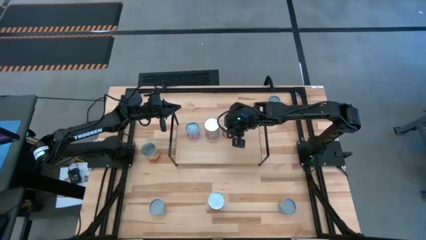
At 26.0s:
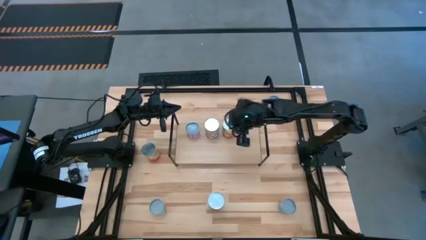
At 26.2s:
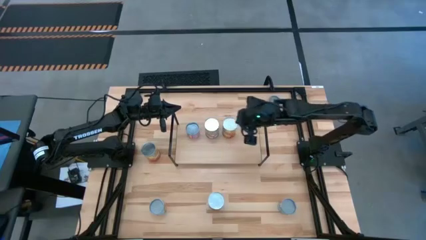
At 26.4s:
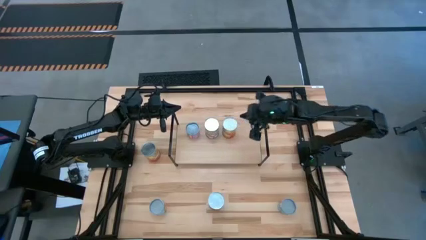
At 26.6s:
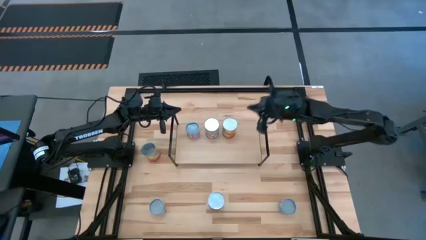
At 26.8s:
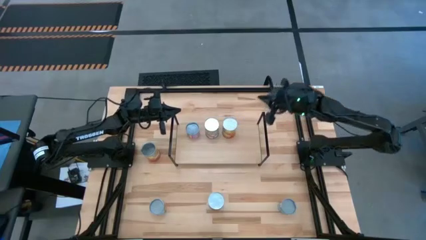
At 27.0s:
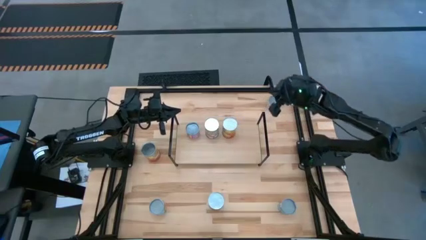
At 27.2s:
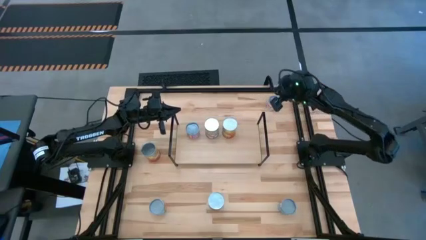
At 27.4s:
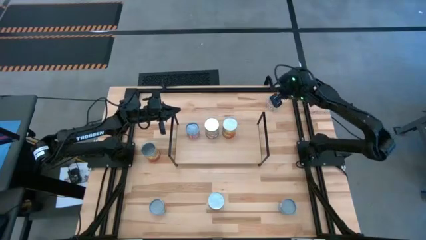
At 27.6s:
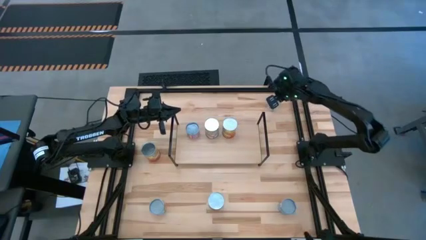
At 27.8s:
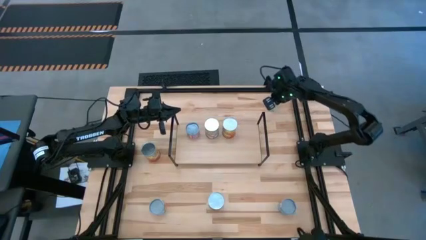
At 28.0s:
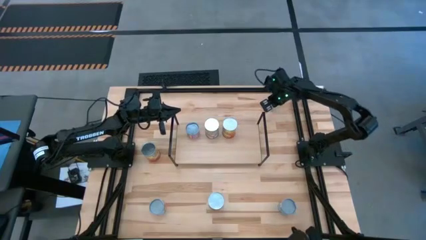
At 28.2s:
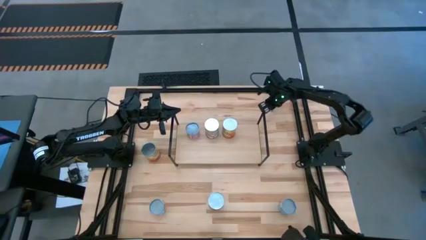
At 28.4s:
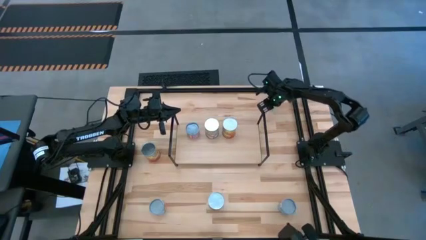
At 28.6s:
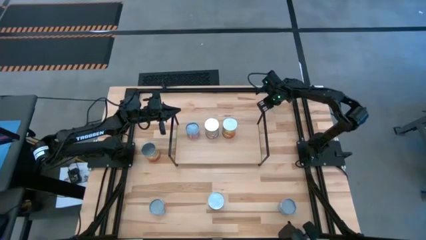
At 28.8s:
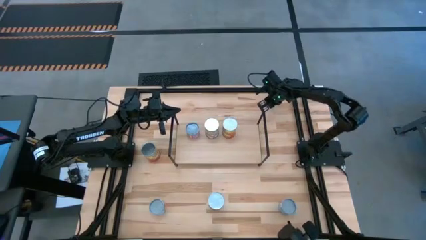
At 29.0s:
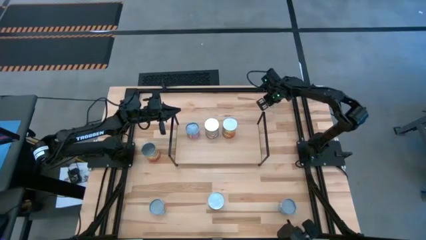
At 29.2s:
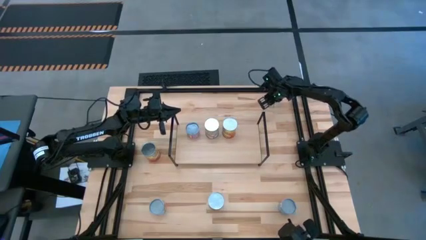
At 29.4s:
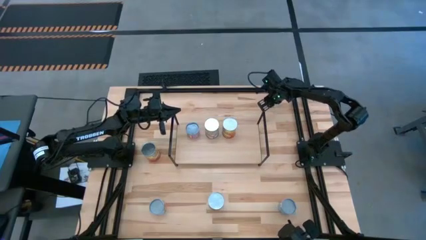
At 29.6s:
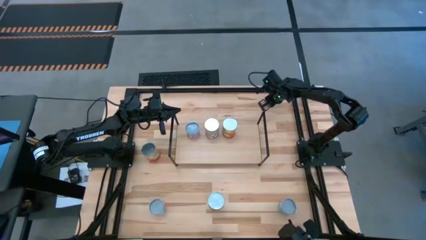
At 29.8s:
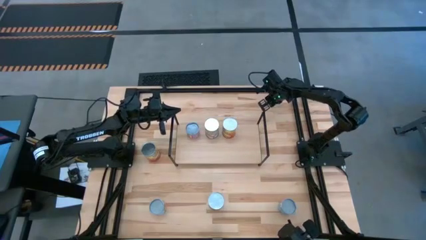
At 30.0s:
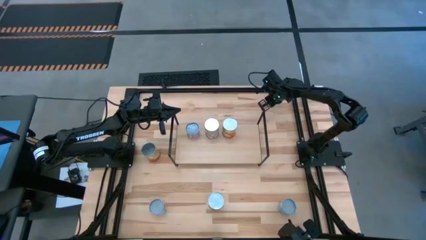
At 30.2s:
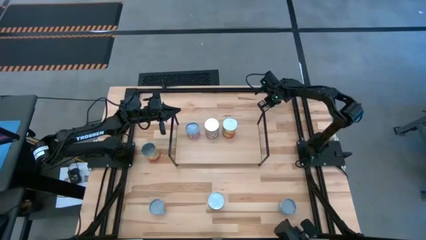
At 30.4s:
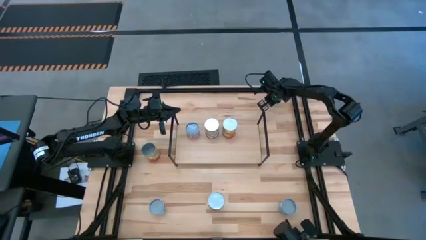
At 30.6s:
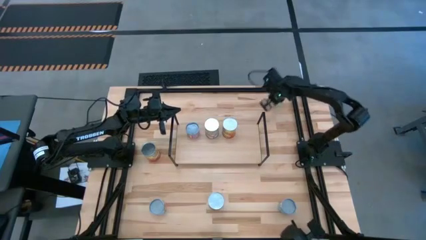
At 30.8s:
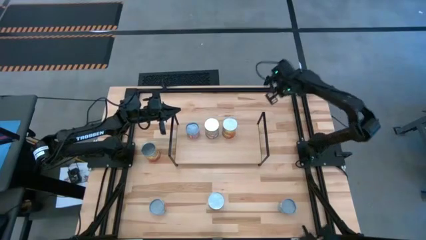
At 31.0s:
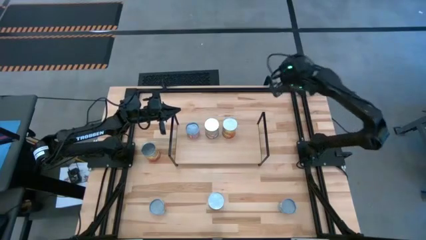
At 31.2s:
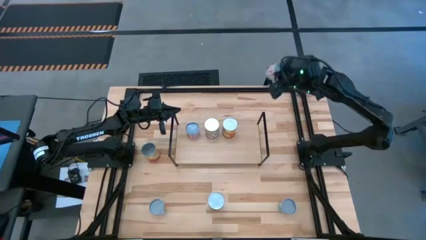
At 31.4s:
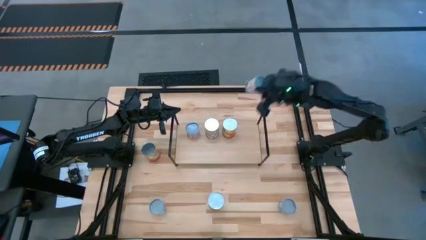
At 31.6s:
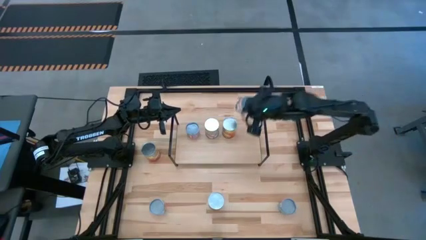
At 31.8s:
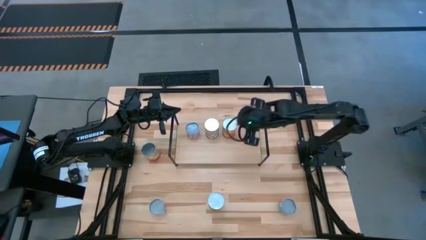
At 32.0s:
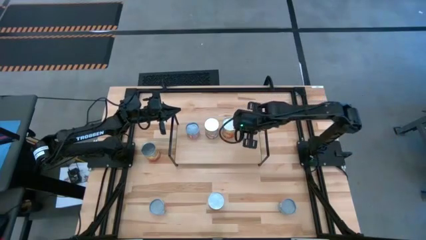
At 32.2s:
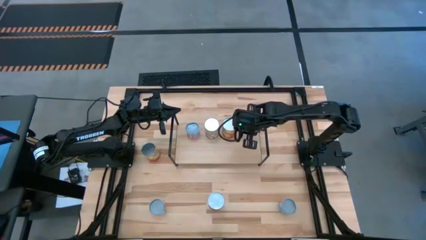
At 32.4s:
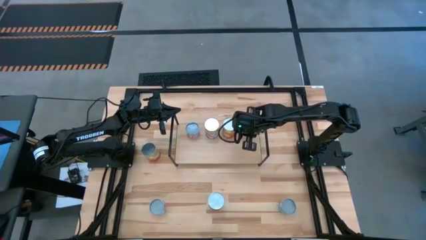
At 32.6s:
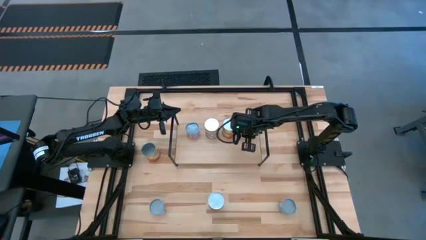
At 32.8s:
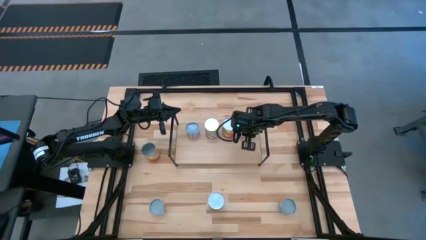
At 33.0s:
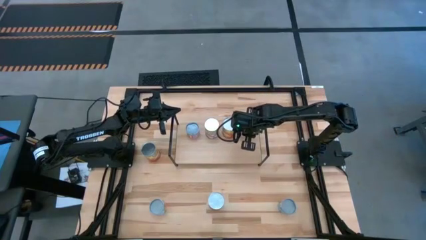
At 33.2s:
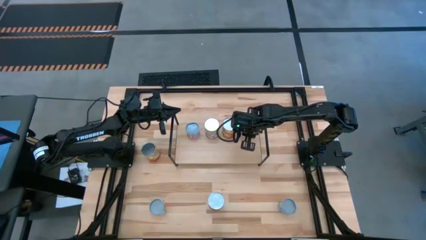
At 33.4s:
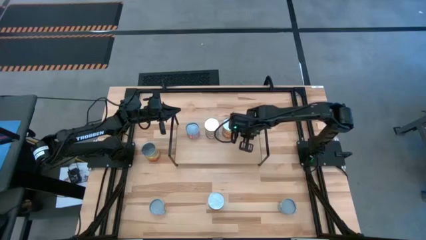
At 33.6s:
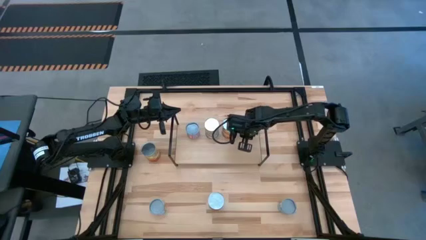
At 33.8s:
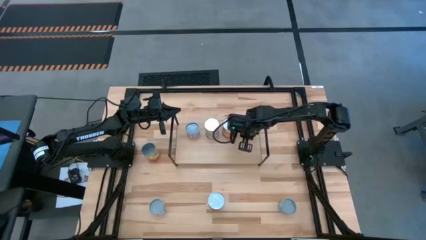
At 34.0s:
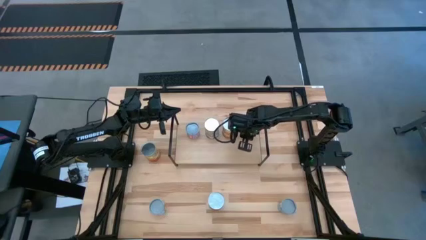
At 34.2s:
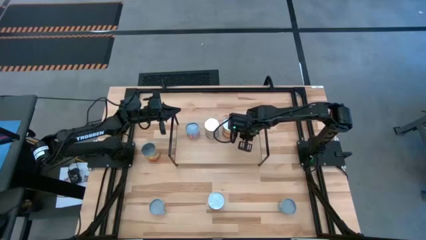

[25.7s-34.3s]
Task: Pick and place cans onto a shelf
Put the canned peas on the shelf

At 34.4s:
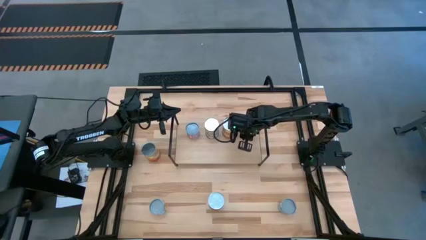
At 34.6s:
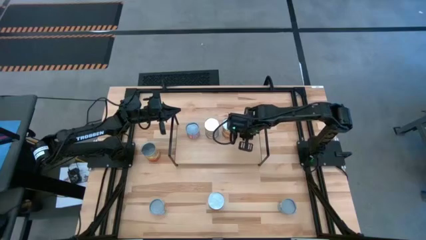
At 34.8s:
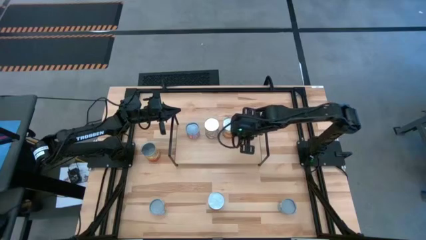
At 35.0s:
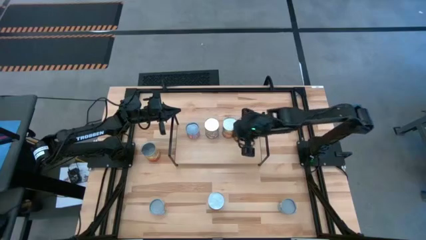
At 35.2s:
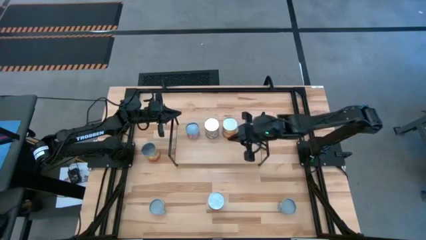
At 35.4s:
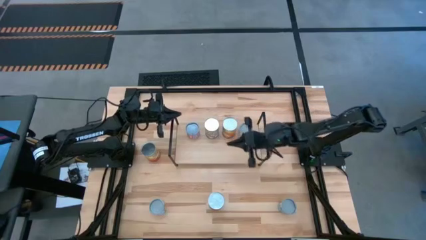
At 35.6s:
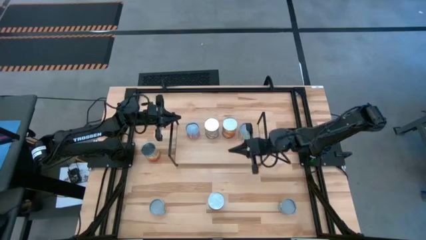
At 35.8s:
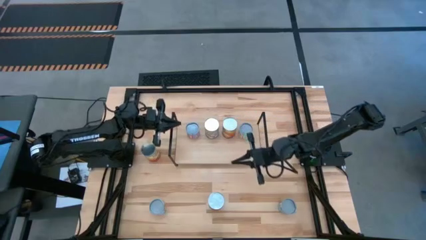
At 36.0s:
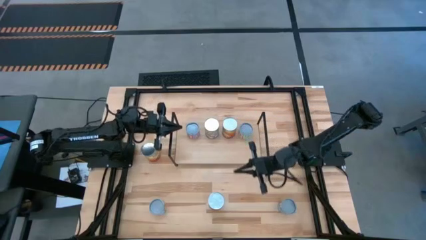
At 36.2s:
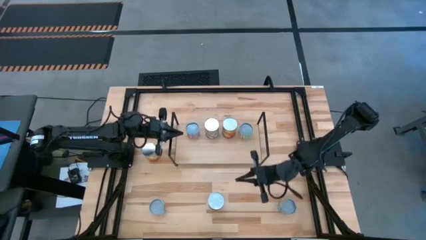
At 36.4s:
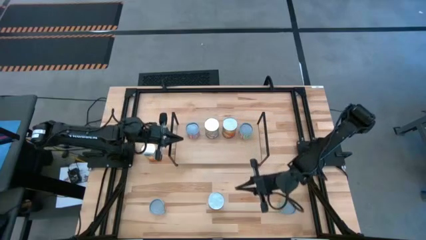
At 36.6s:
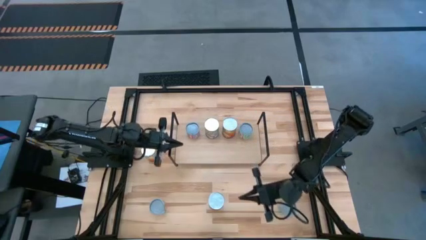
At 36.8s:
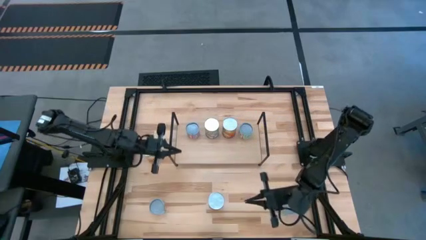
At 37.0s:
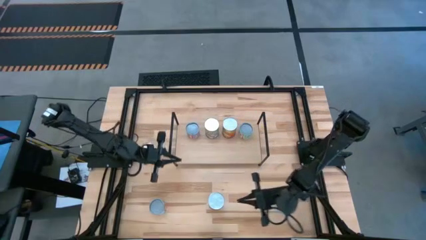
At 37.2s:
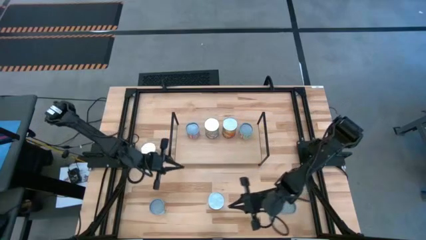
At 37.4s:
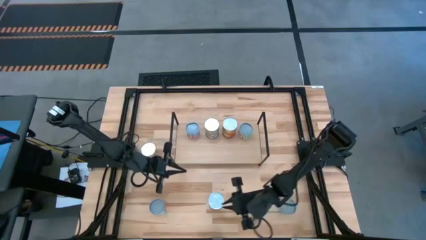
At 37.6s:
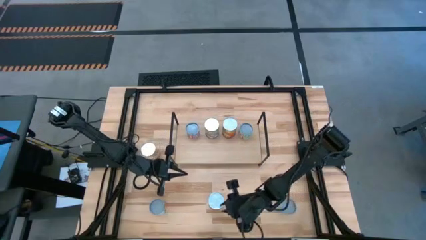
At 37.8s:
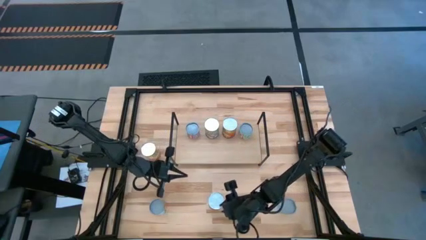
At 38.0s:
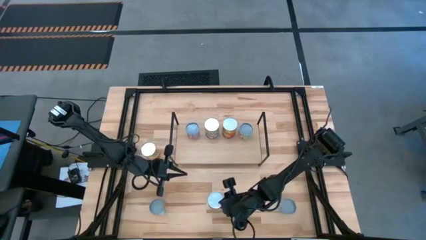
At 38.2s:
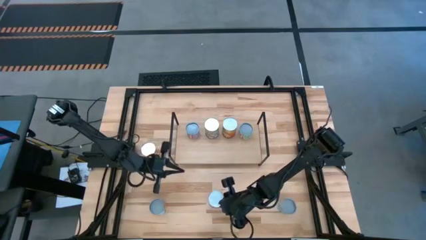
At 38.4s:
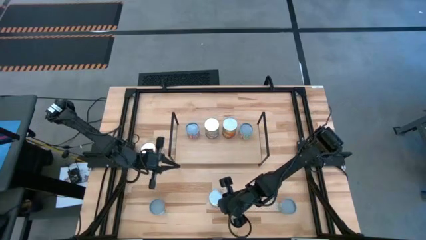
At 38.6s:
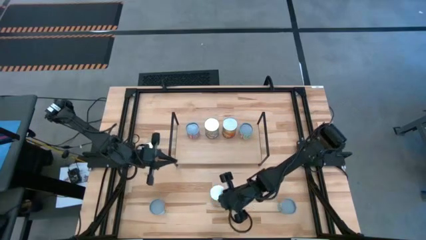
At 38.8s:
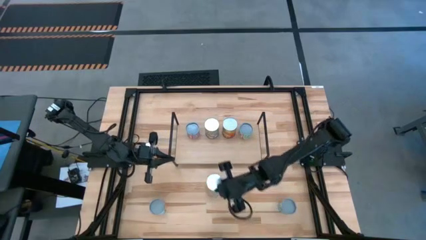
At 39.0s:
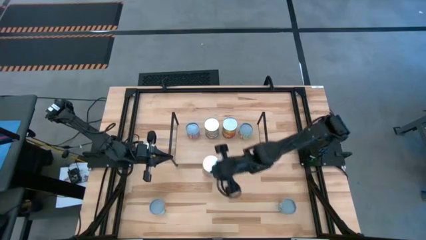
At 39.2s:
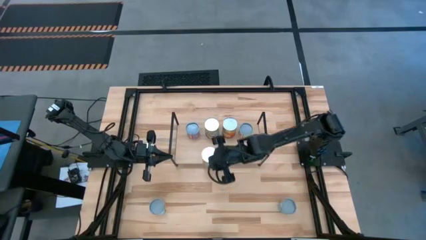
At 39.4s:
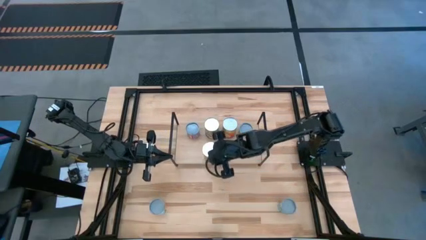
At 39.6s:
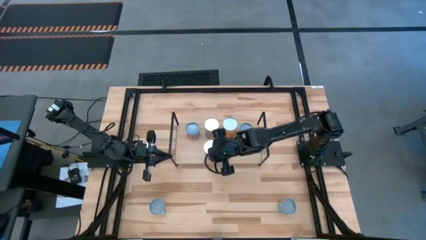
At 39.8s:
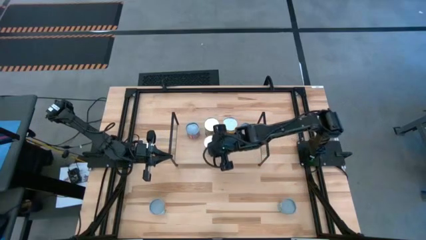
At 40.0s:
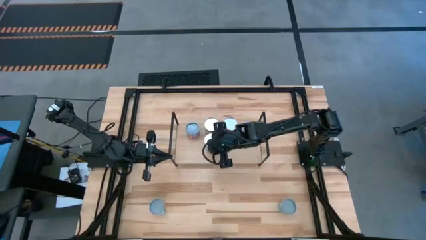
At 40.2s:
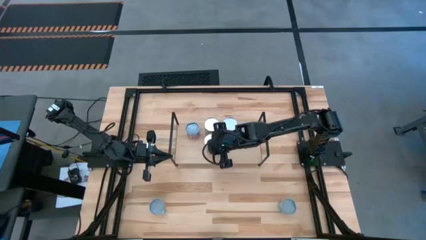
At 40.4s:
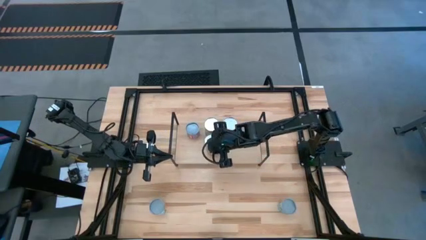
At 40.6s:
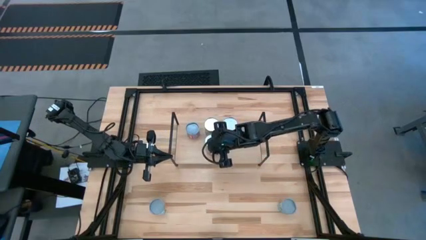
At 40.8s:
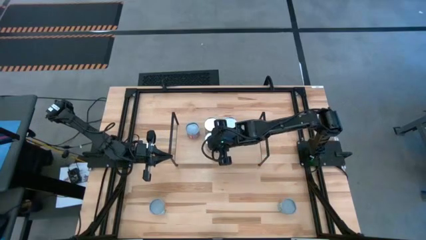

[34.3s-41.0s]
Put the canned peaches on the shelf

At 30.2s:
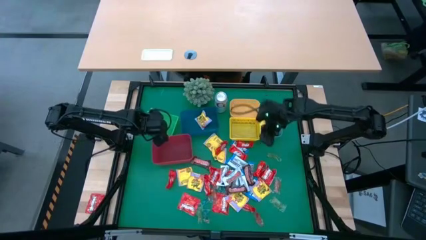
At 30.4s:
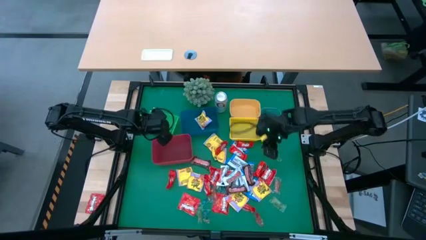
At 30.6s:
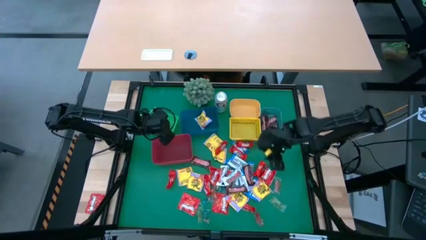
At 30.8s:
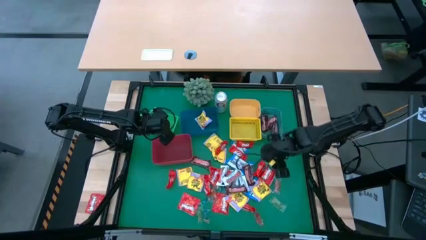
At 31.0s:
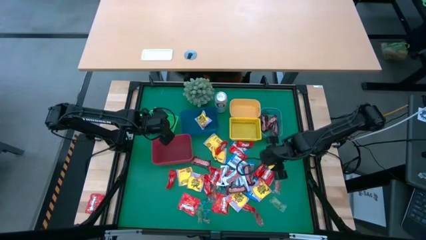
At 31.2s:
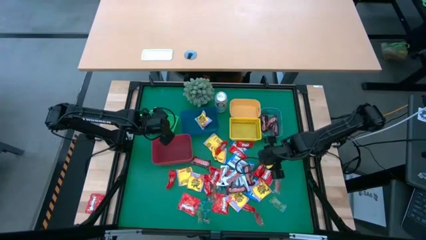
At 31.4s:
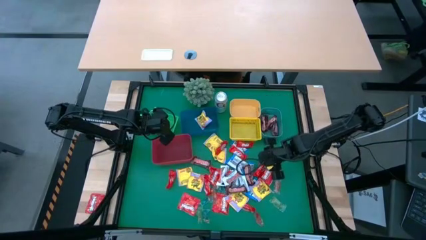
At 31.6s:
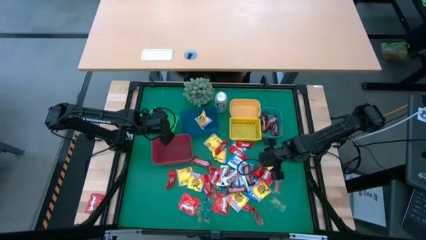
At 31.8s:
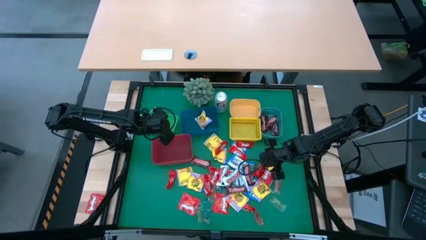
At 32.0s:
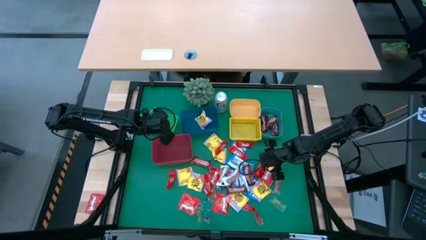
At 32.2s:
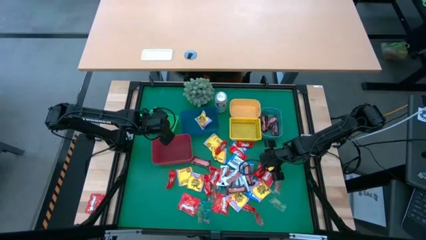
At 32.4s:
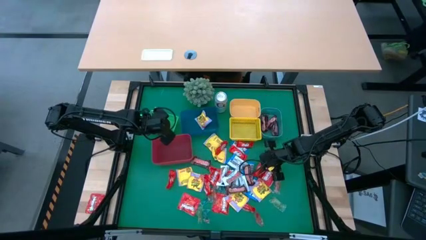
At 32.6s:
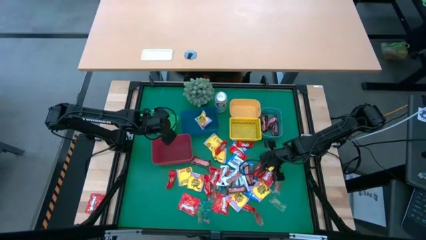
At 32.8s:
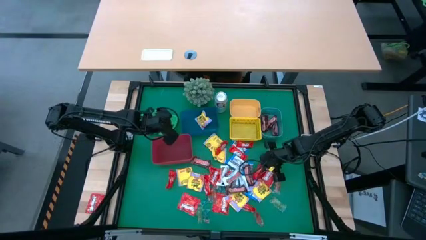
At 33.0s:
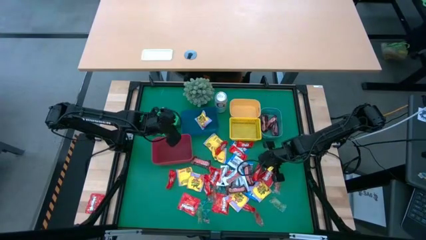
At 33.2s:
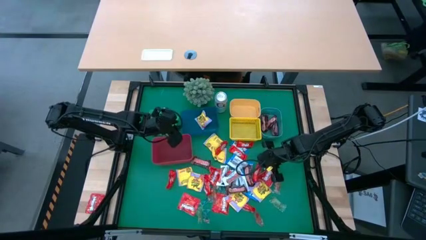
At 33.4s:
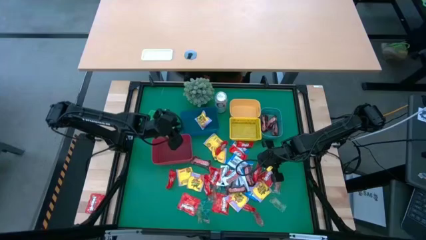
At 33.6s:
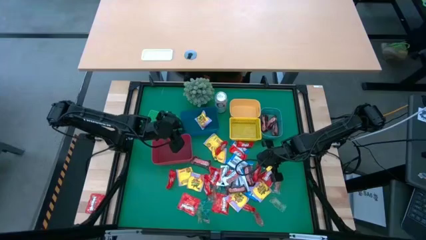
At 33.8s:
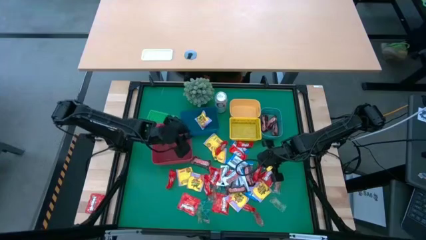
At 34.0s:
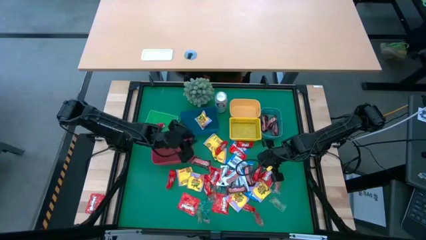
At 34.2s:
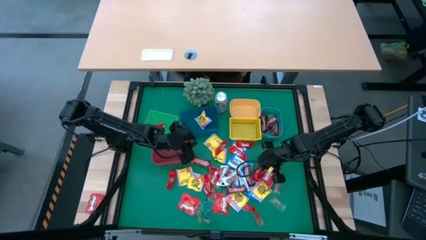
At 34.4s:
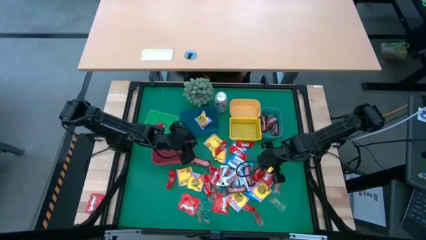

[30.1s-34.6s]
Task: Sort candy
Put the red chocolate bar into the green bin
